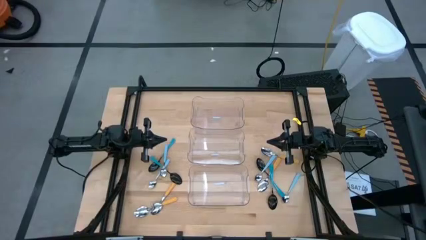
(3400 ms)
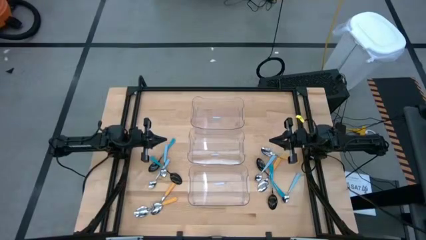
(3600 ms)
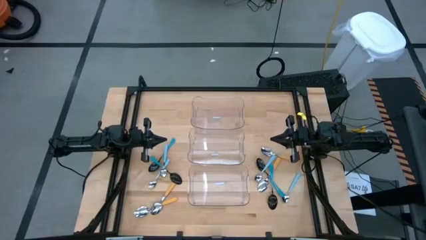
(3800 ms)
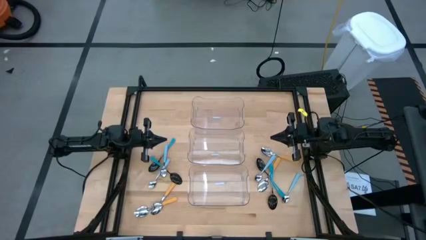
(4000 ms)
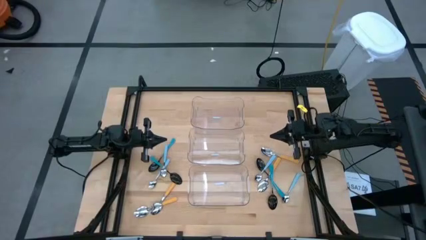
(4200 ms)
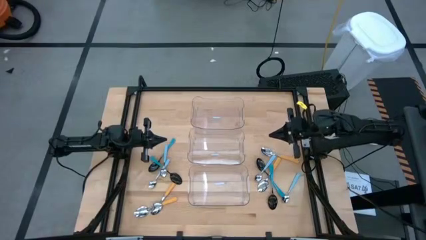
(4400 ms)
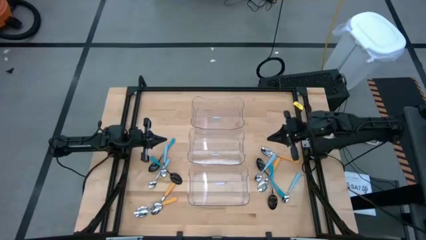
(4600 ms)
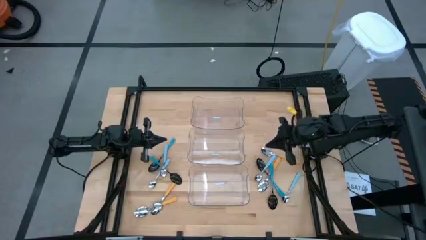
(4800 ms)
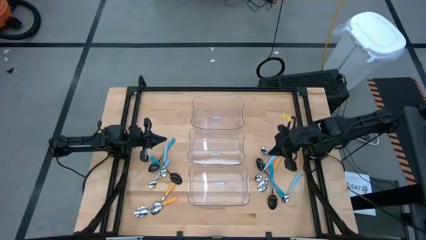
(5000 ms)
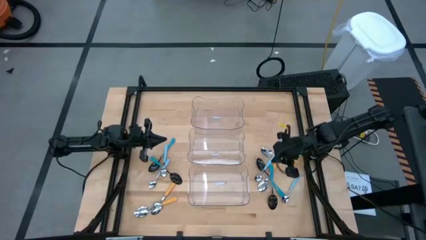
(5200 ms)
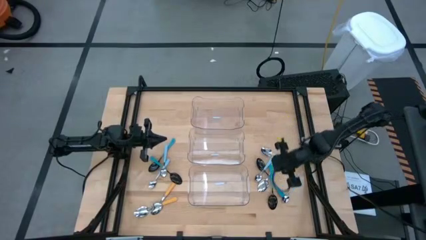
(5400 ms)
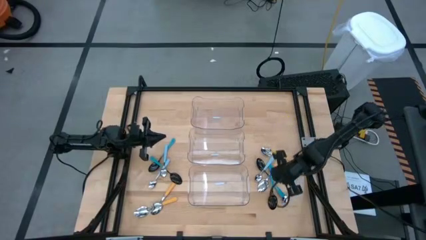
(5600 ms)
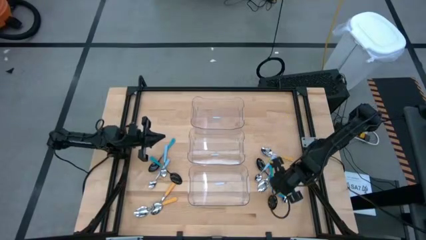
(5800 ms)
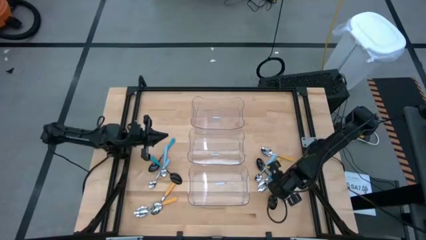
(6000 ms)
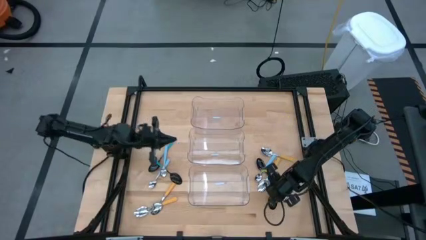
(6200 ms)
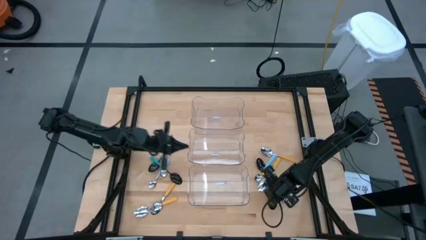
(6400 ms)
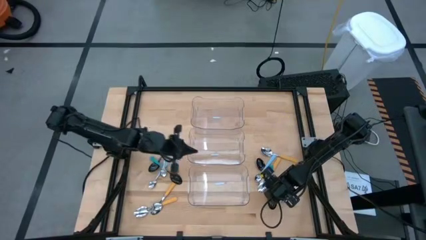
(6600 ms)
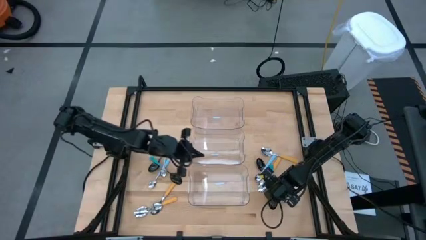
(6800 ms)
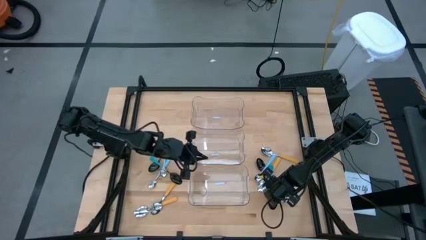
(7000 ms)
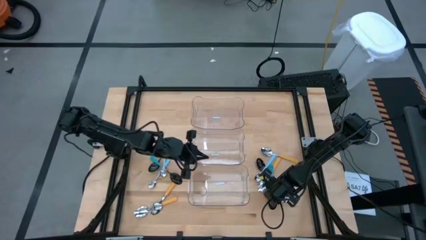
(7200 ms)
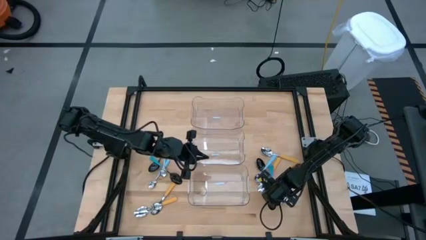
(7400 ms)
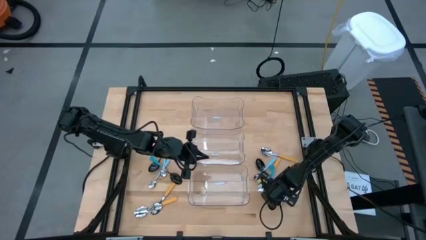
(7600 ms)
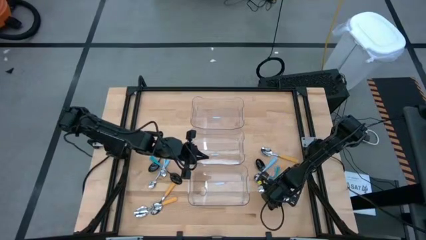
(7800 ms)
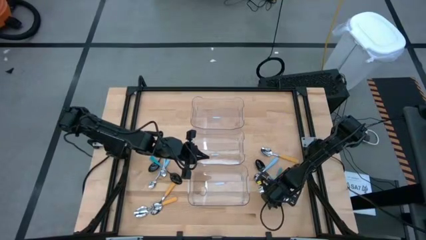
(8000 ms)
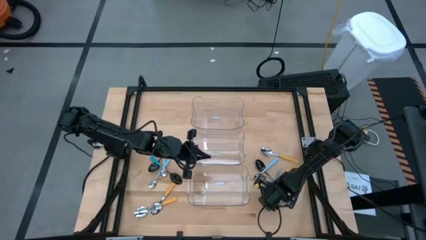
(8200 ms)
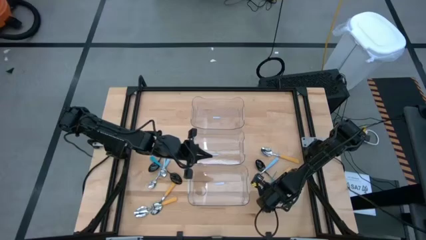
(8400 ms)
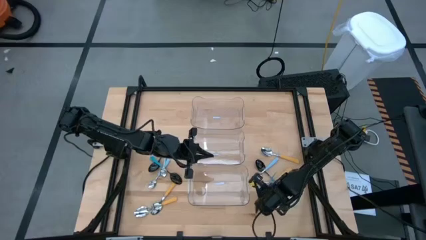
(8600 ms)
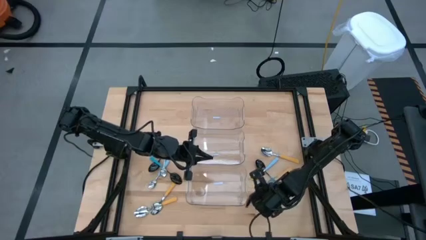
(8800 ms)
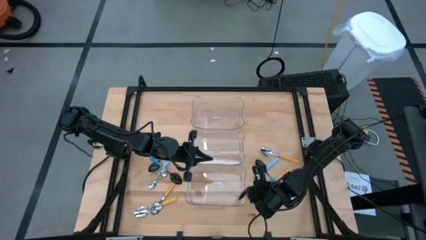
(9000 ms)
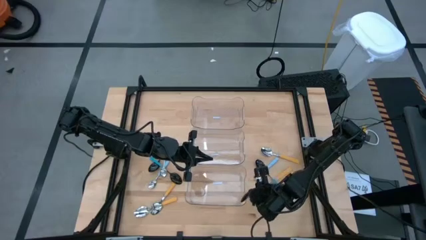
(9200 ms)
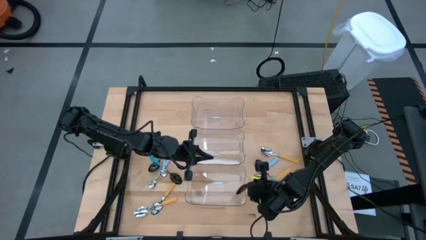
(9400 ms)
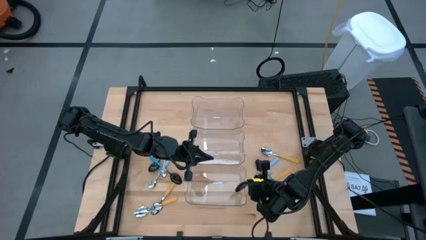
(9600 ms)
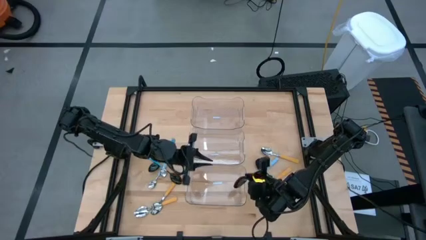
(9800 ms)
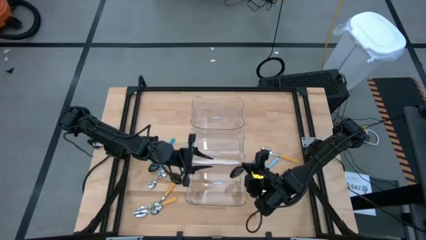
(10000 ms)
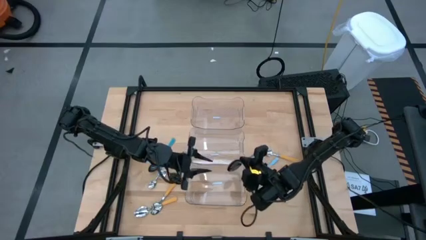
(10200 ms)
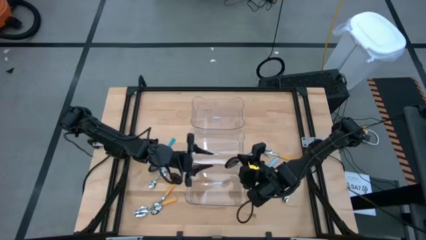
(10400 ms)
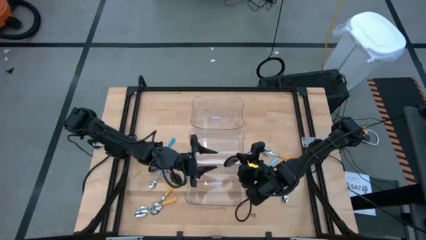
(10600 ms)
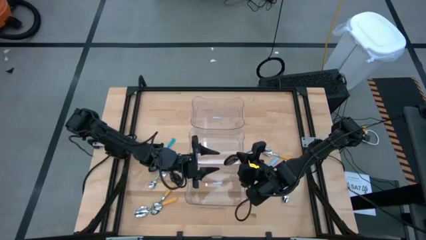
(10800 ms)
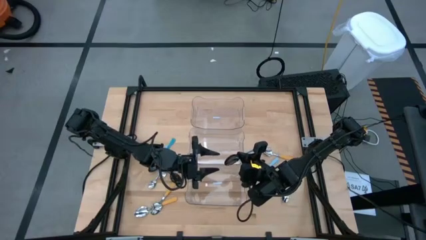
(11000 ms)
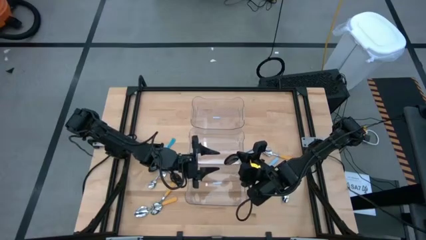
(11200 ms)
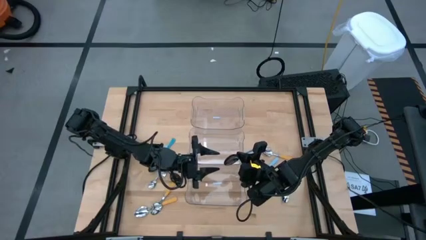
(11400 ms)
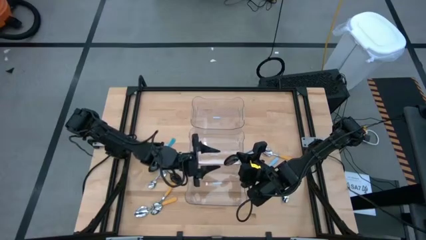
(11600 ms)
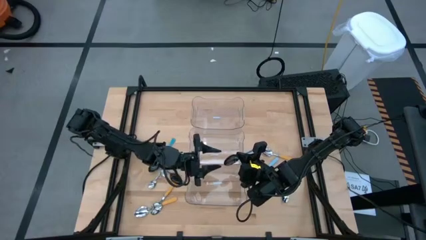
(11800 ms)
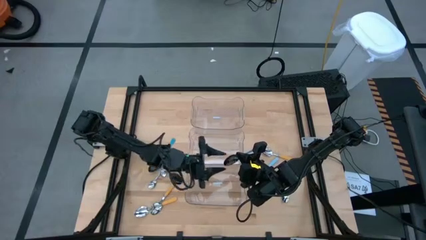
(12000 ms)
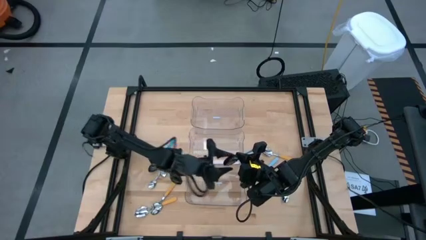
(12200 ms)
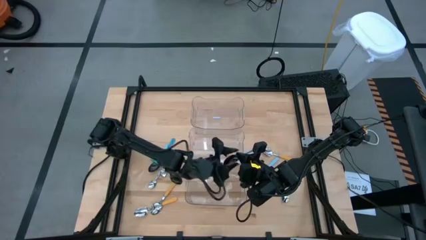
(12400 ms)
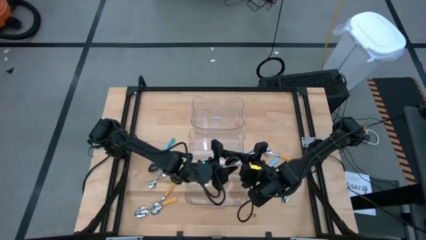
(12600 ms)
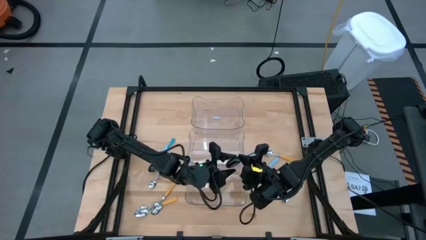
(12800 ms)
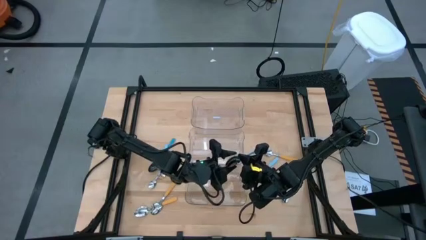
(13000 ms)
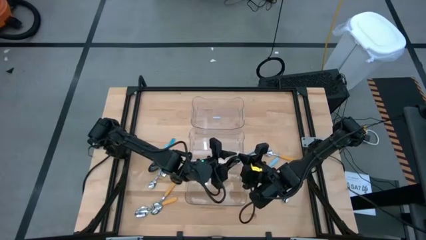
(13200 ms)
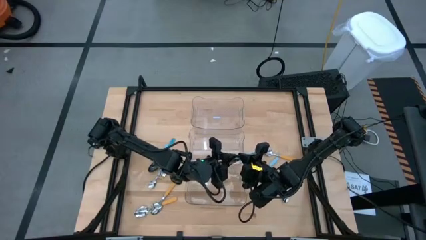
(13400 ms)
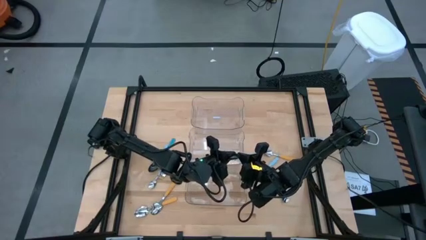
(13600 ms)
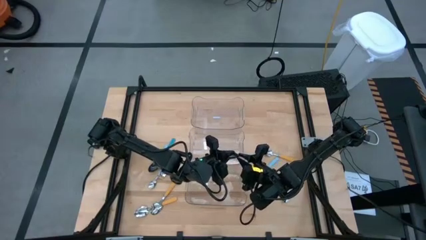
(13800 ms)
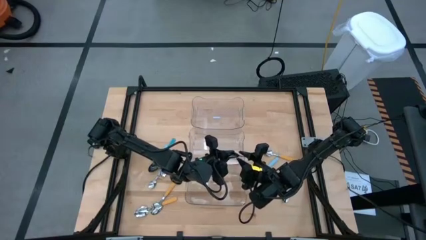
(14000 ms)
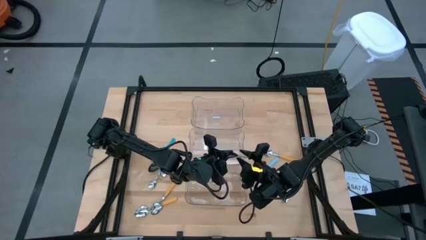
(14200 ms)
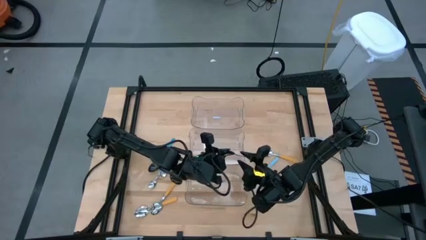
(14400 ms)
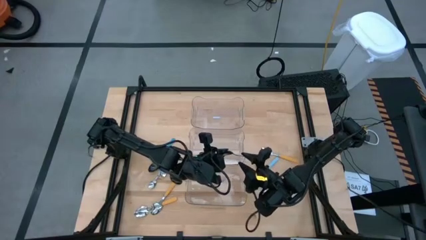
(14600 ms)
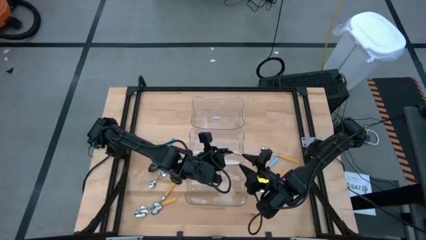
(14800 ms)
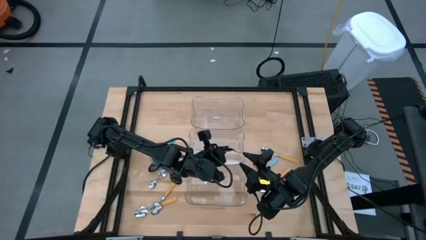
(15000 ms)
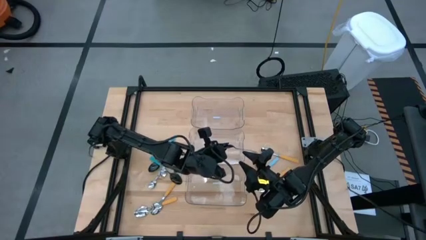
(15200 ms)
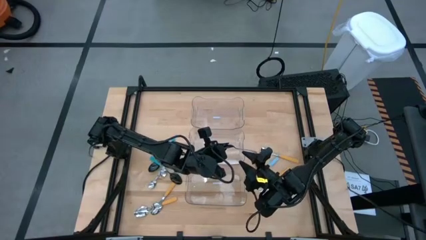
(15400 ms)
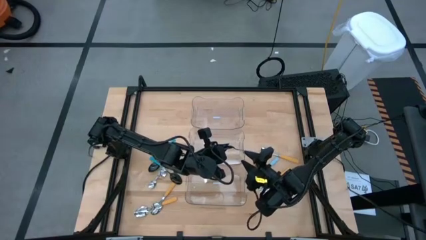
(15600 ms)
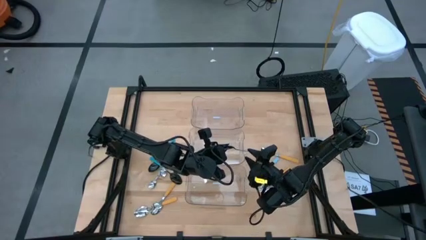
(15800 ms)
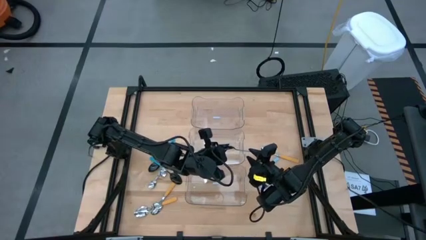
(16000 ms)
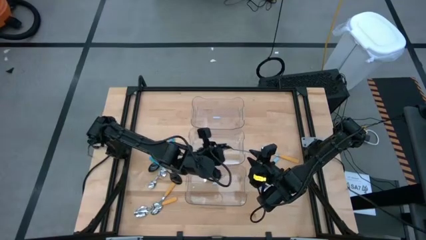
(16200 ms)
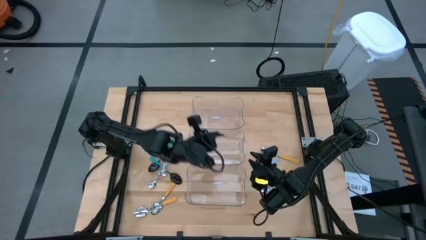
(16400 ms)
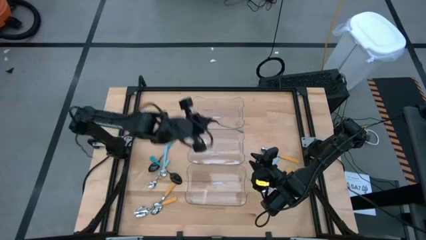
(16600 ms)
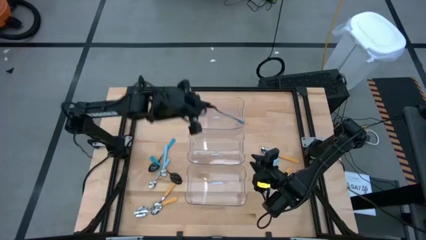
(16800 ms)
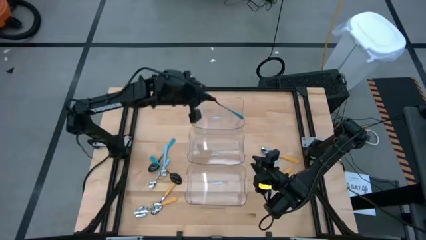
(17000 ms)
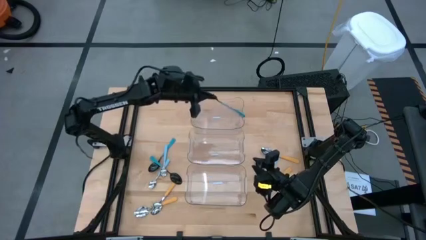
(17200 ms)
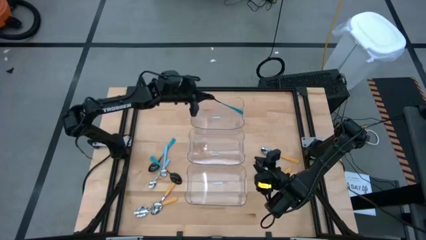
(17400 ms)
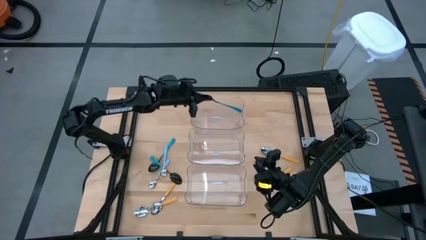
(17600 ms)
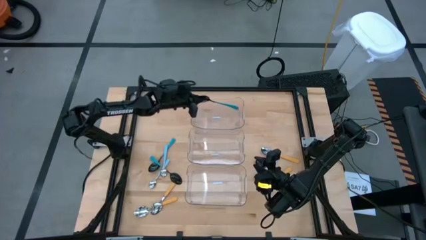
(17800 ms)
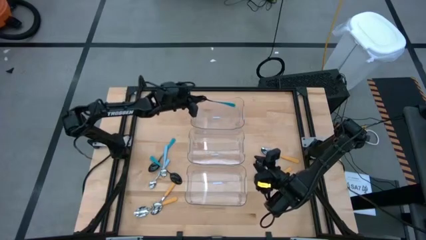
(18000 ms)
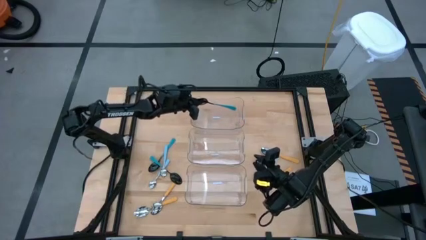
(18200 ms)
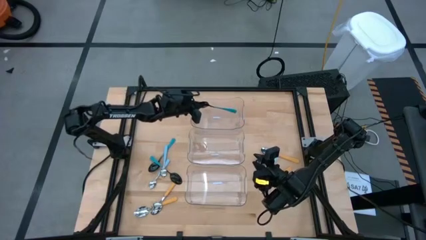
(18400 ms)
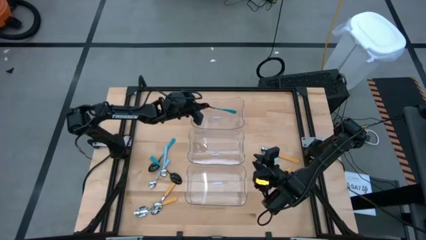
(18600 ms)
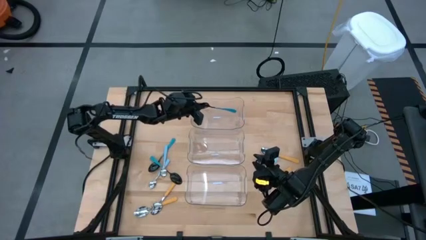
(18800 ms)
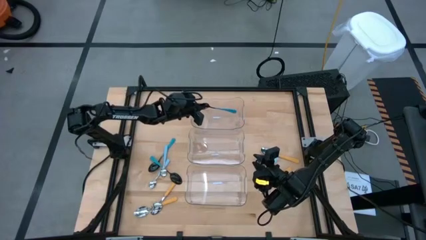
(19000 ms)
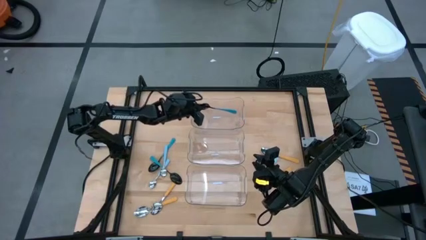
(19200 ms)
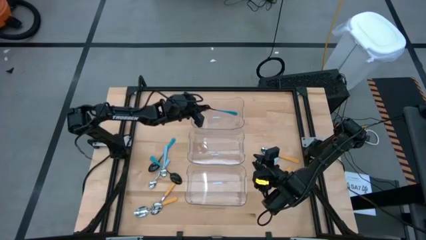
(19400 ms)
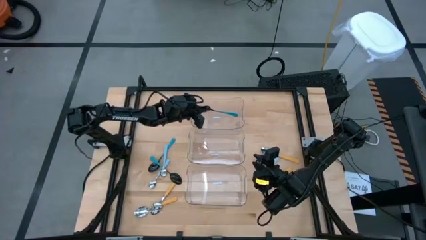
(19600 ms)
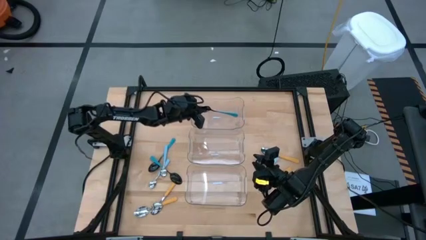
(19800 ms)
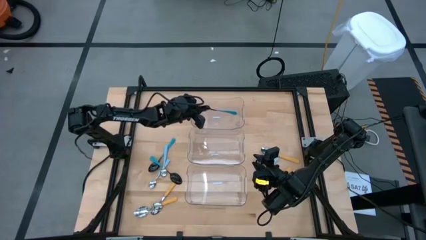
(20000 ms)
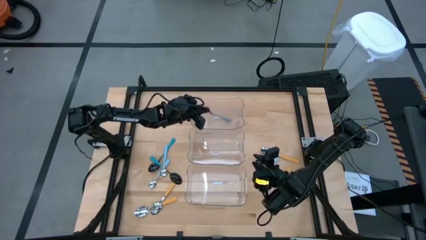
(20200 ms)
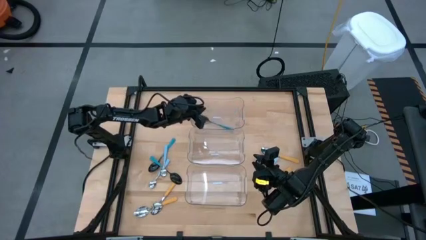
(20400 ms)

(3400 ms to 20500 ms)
Task: Sort silverware by color (type)
Put the dark blue spoon into the top transparent bin
